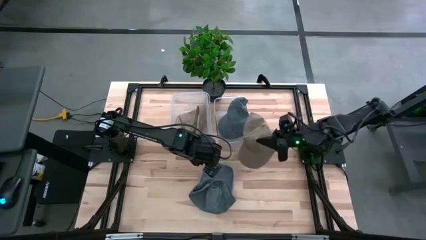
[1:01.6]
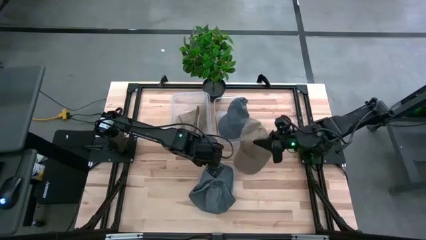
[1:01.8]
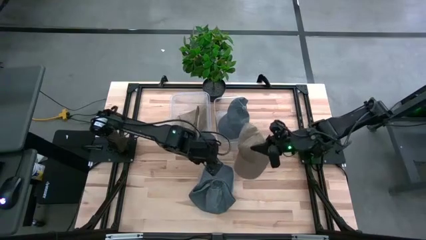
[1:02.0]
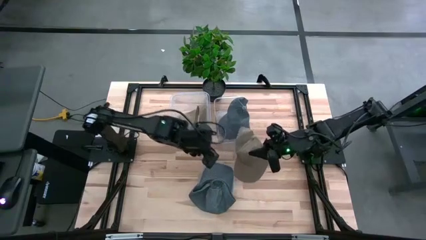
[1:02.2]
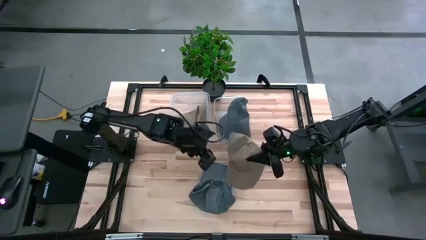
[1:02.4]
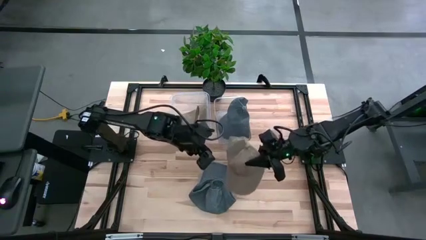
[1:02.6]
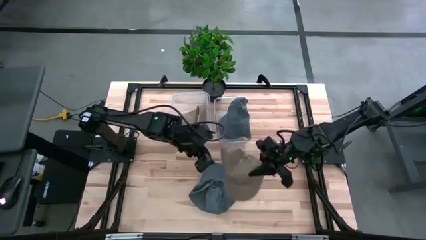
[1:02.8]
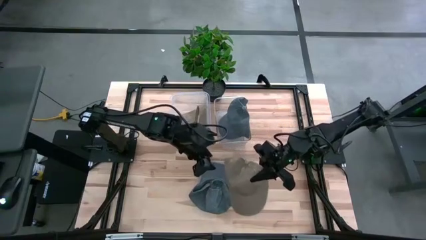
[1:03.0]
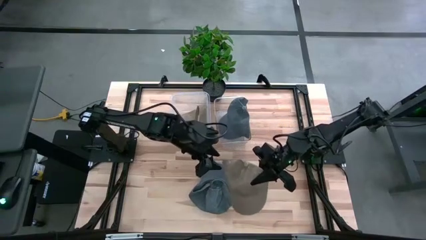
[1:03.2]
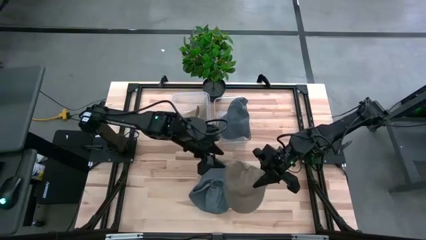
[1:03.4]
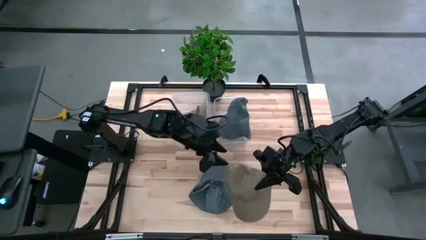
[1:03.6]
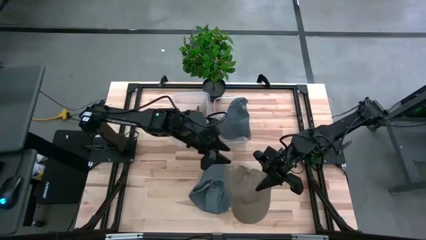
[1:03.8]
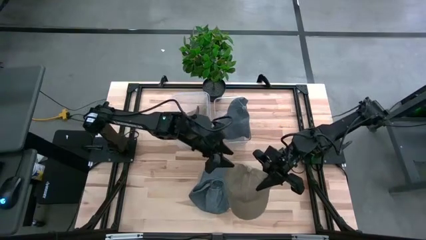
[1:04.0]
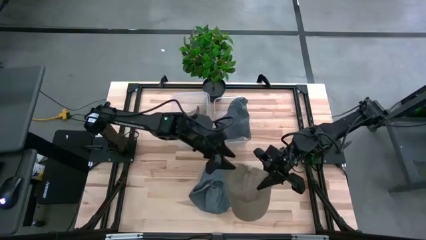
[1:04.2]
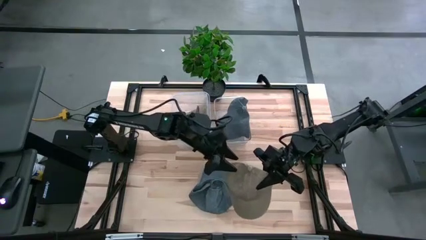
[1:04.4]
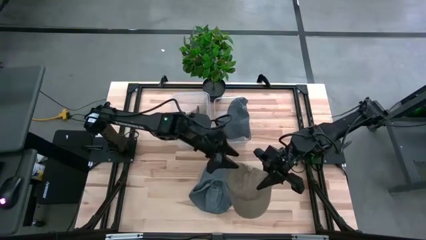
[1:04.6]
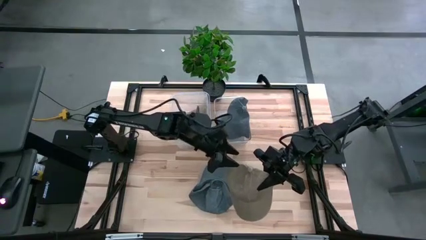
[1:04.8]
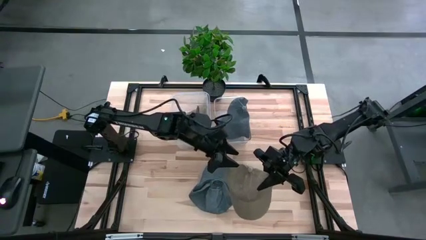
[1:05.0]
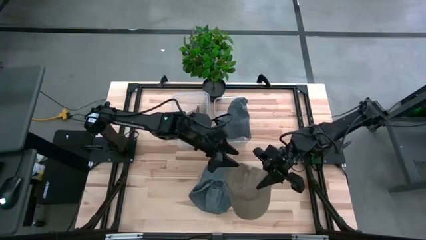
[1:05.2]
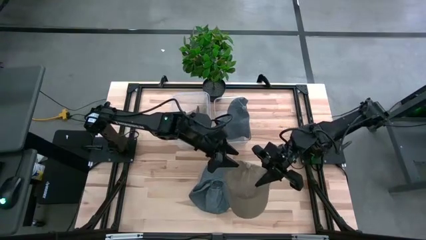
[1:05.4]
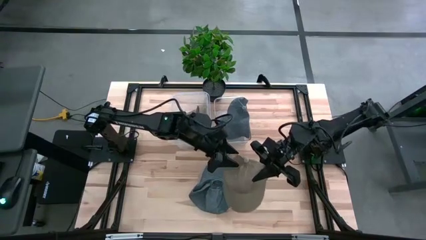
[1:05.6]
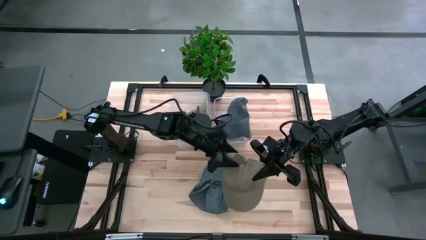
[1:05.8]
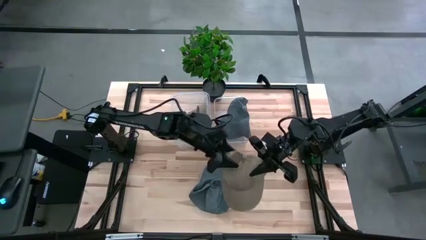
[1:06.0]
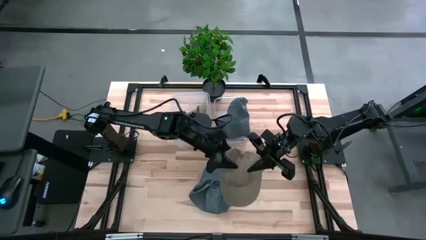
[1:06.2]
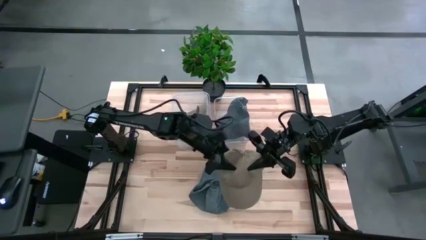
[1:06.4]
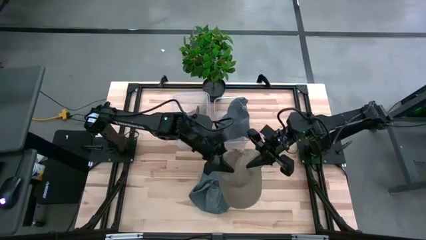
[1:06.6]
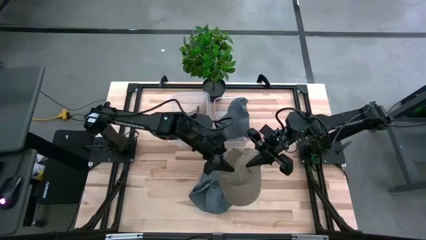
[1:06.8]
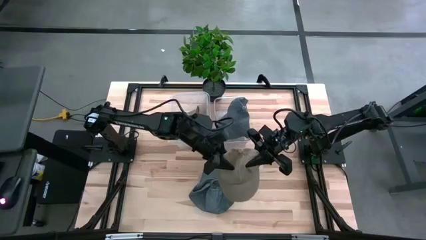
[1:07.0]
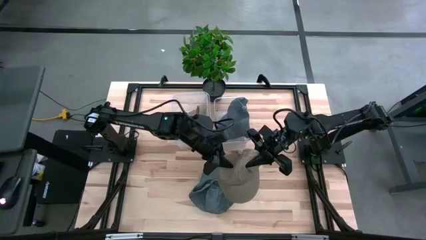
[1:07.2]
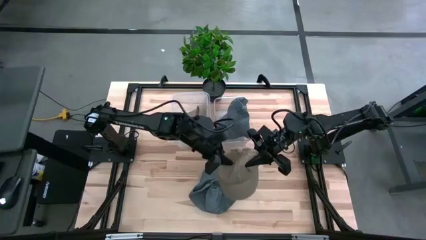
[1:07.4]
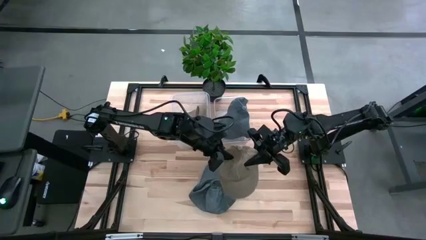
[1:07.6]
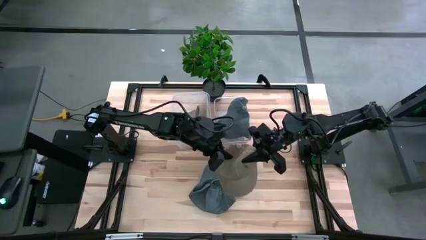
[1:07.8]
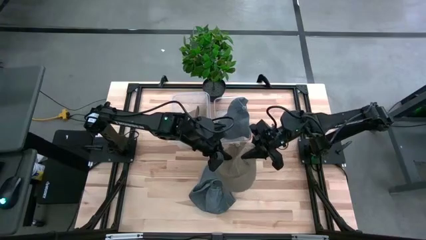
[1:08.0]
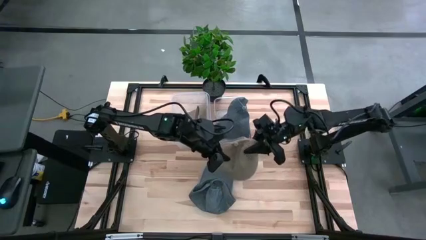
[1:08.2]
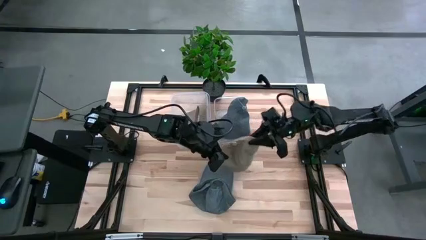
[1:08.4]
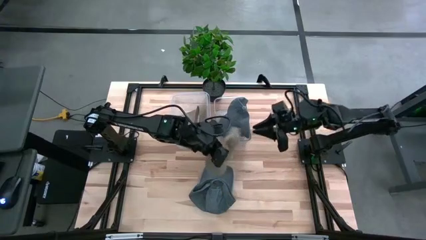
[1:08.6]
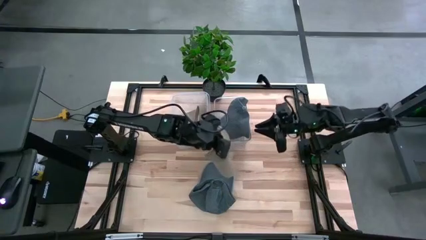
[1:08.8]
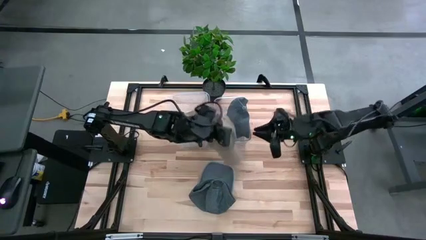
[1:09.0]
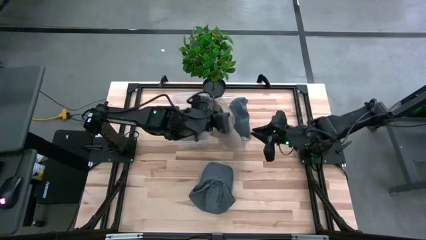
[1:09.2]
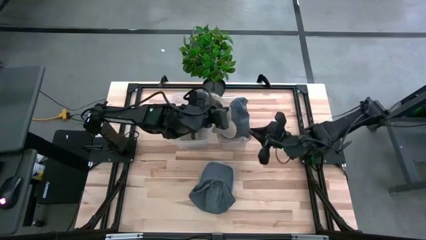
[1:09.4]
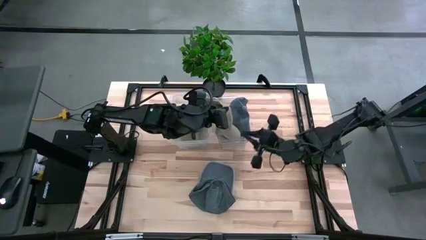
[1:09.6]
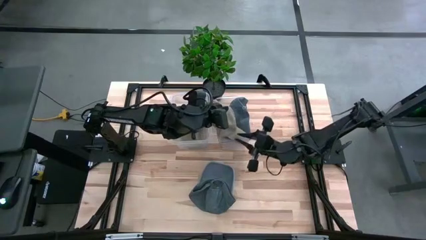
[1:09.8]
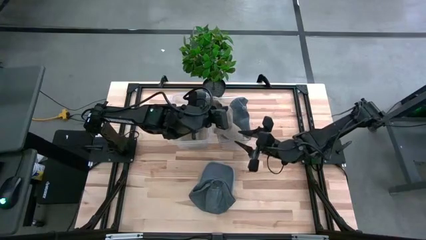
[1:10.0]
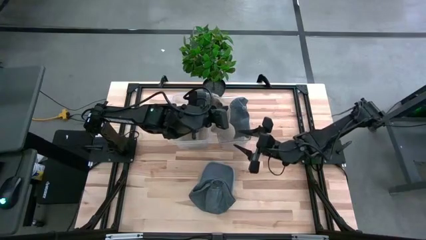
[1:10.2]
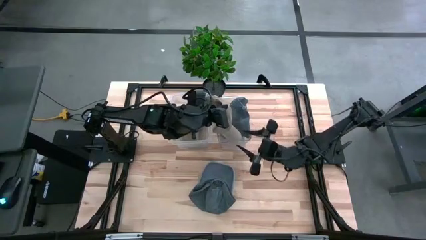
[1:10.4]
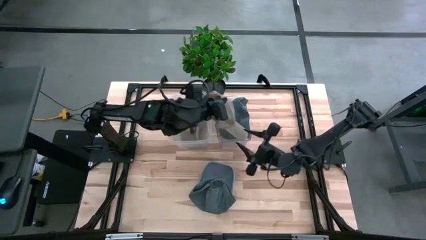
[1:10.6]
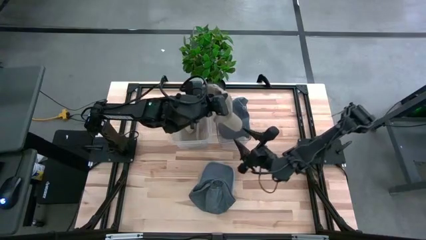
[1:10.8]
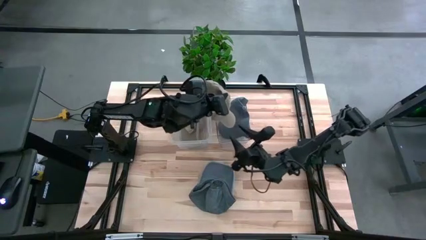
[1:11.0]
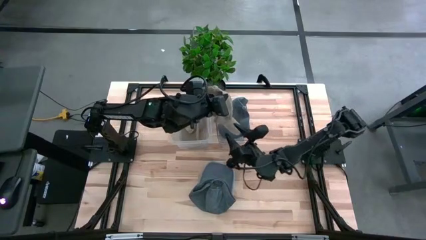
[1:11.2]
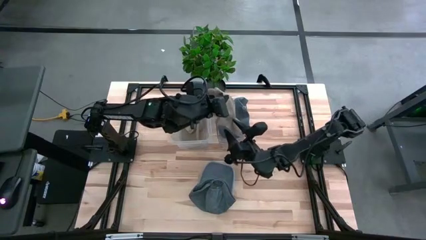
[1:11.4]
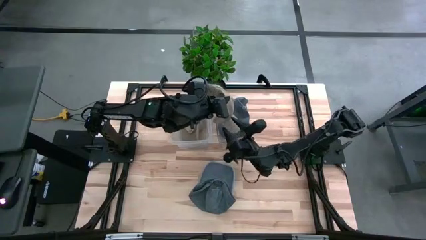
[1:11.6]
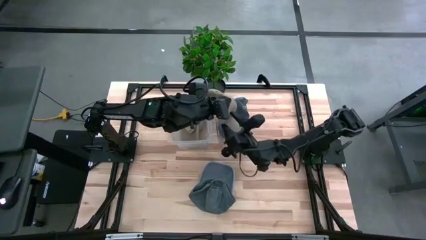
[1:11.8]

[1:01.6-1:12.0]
Task: Pick & Place hat
Put the brown cap into the left transparent bin

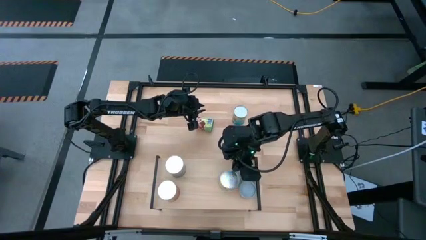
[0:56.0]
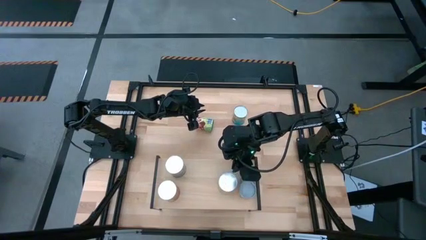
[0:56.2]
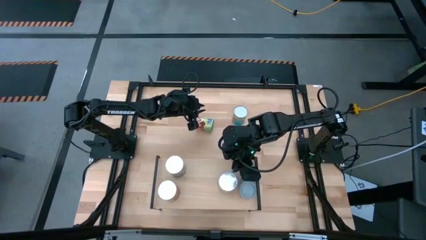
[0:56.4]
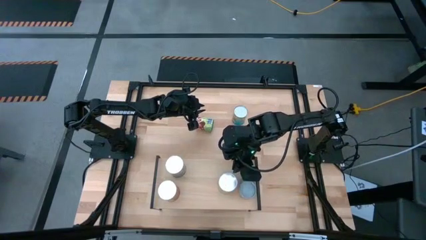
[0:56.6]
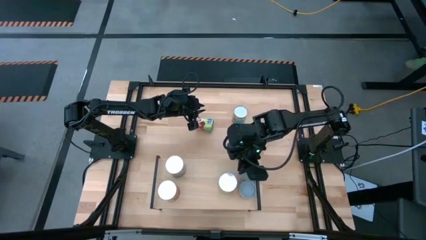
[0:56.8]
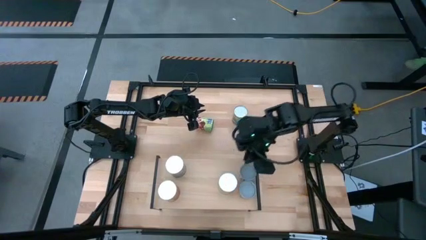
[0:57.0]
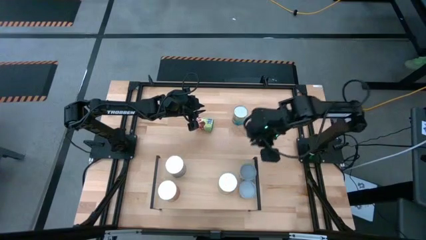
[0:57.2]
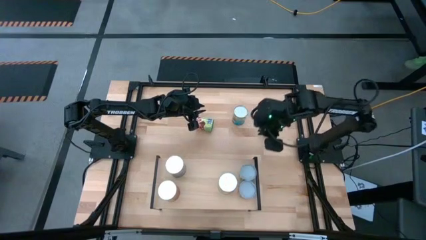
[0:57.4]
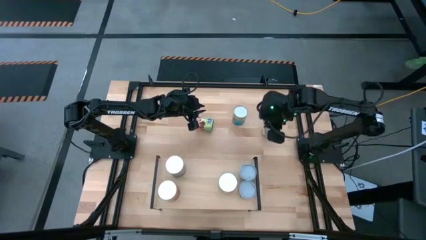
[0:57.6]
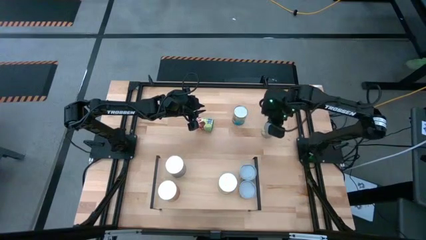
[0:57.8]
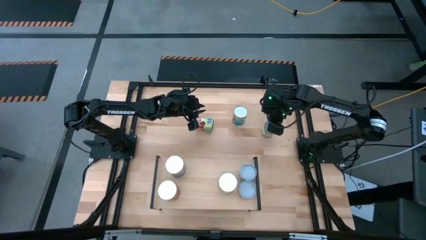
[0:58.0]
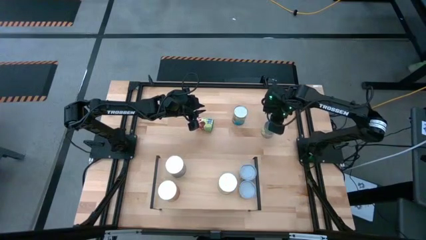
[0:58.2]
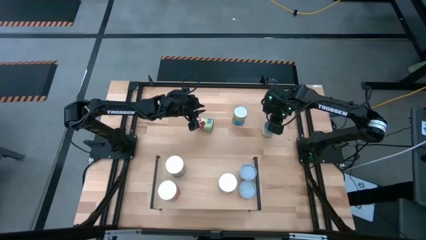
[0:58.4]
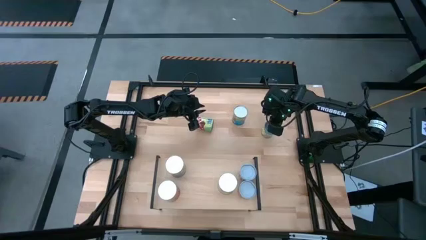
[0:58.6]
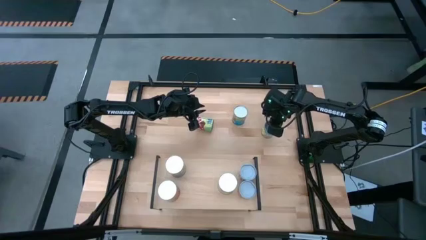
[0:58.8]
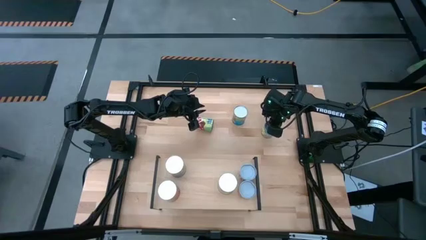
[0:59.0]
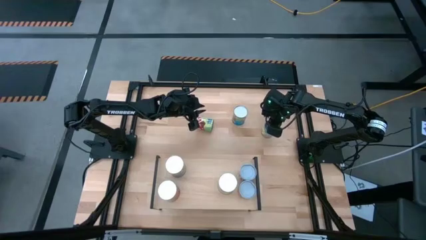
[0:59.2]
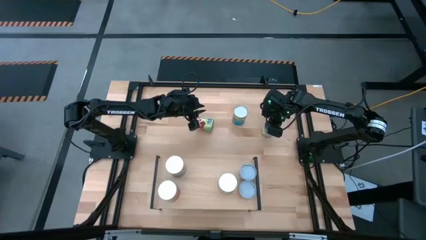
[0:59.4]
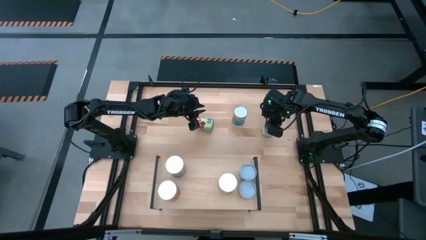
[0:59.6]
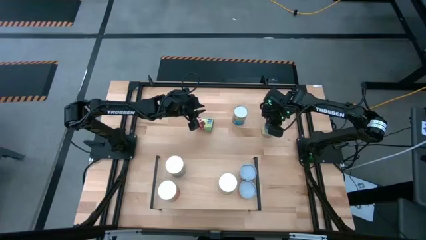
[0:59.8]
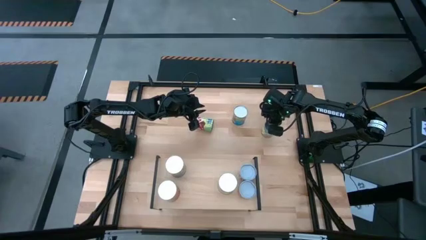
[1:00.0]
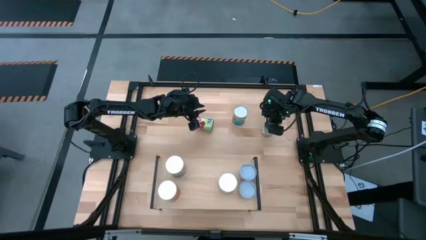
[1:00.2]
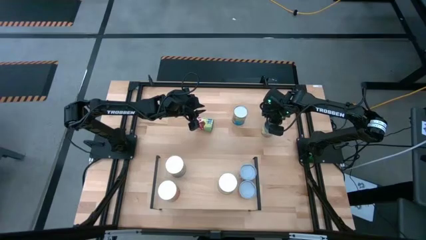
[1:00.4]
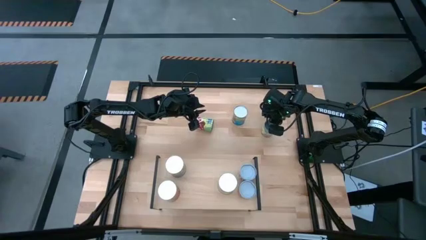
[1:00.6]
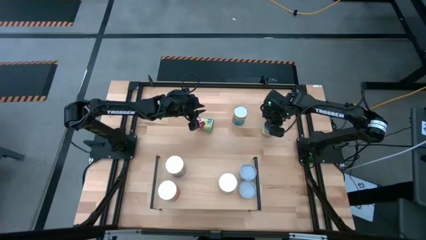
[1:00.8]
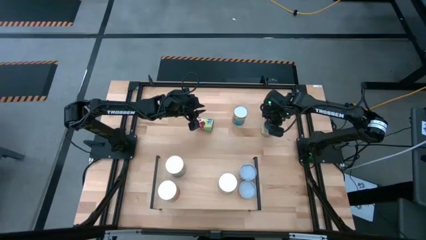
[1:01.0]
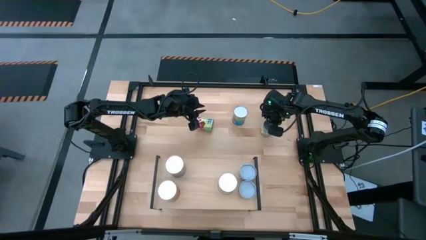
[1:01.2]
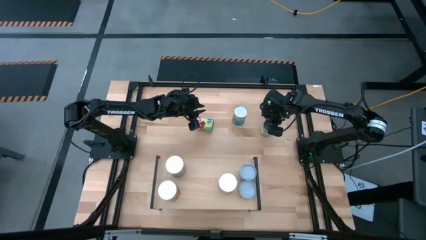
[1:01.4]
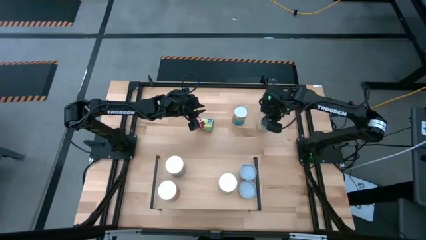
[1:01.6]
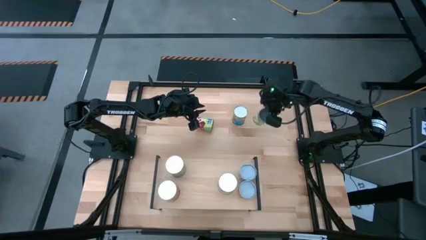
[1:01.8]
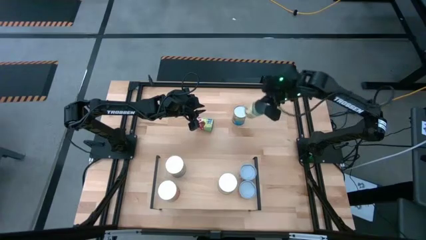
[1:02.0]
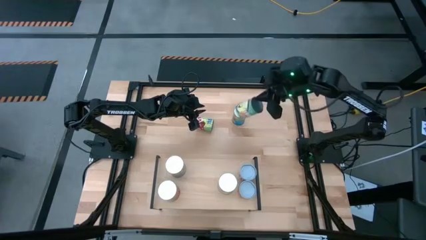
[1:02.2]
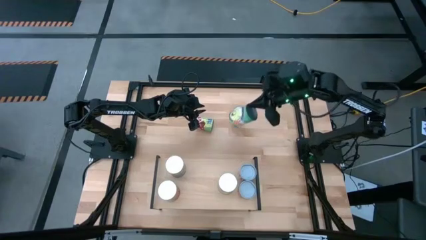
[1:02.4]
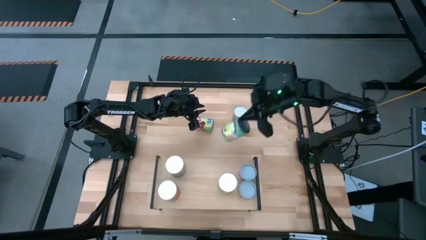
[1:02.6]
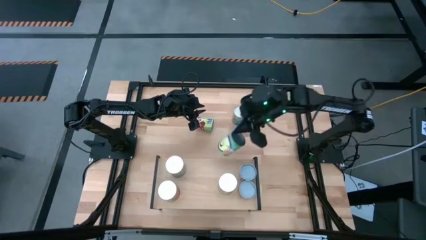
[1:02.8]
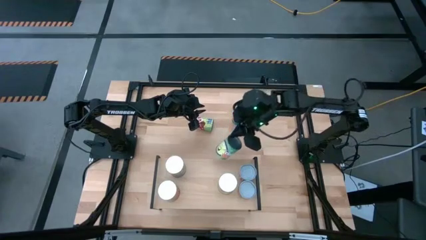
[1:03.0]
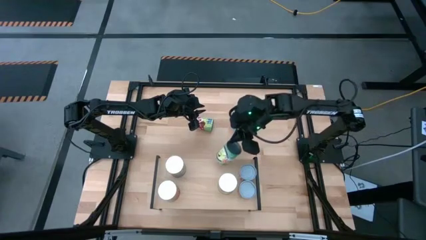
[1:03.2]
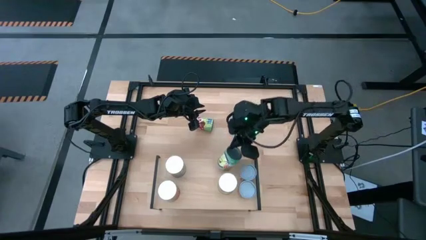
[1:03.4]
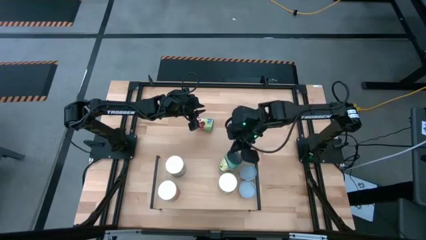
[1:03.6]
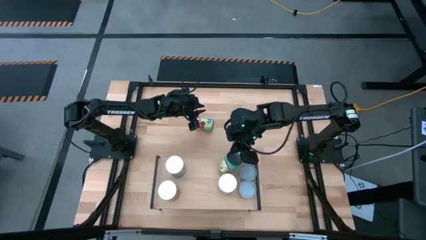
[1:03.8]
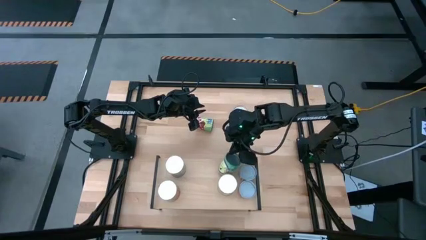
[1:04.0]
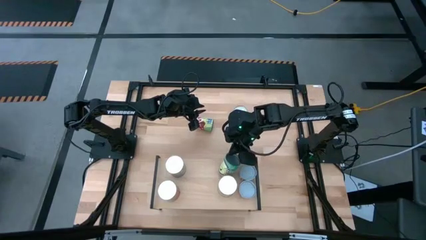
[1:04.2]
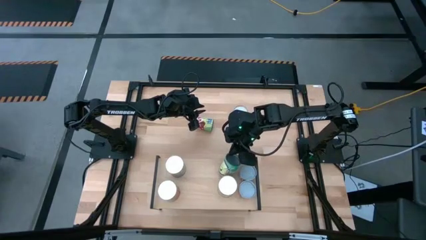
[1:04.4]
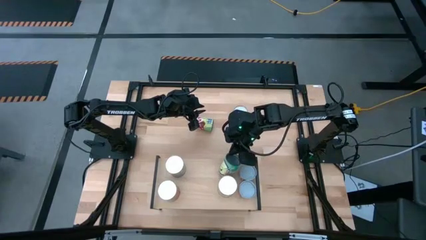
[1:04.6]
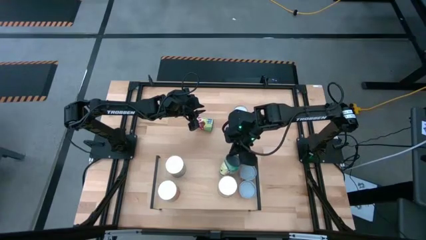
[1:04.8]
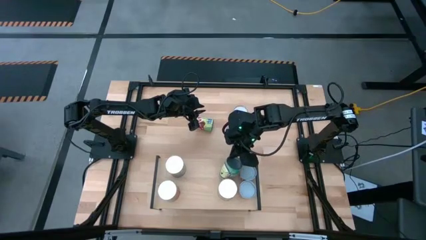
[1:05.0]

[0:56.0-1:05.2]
Task: Pick and place cans onto a shelf
Put the canned chicken soup on the shelf
